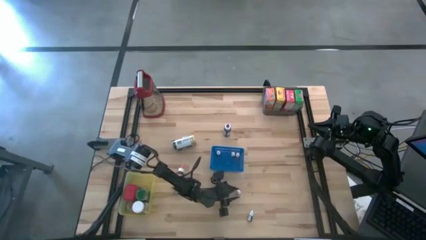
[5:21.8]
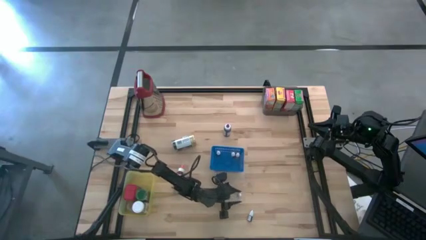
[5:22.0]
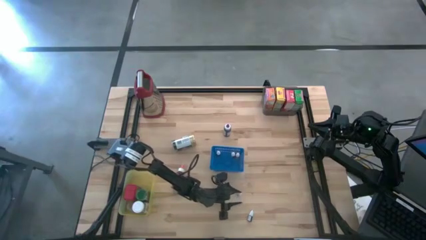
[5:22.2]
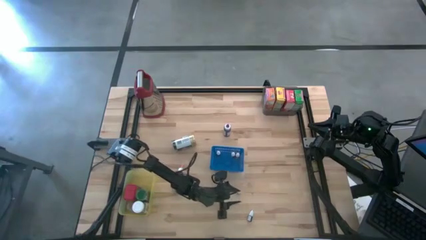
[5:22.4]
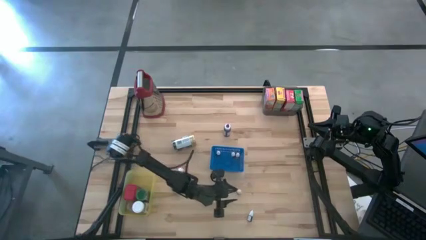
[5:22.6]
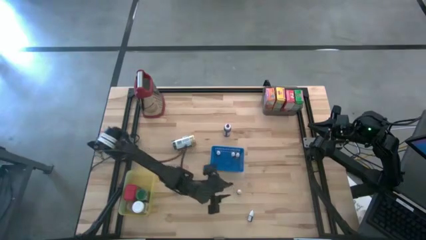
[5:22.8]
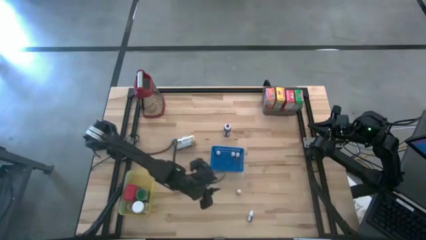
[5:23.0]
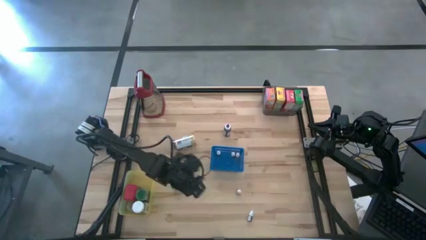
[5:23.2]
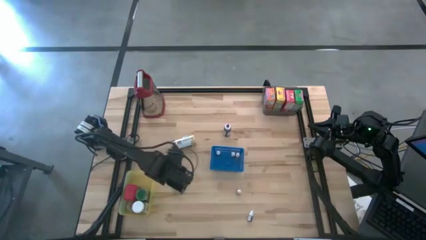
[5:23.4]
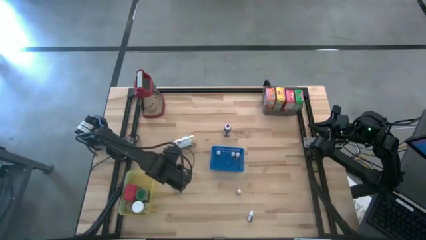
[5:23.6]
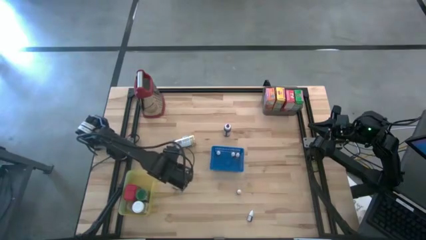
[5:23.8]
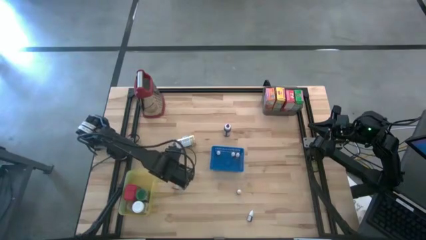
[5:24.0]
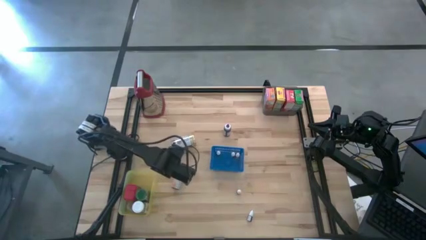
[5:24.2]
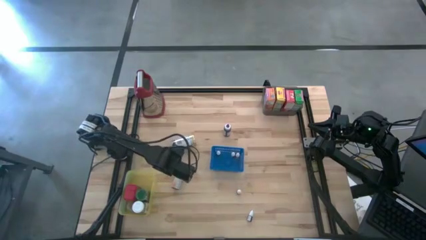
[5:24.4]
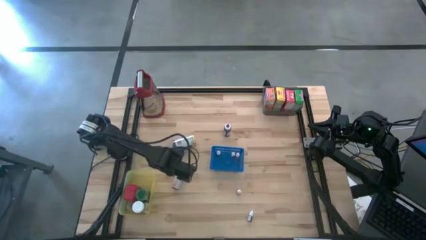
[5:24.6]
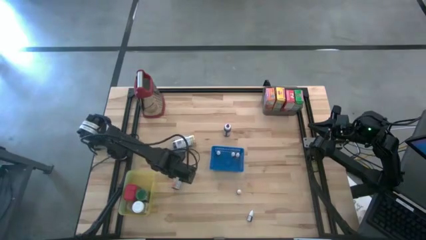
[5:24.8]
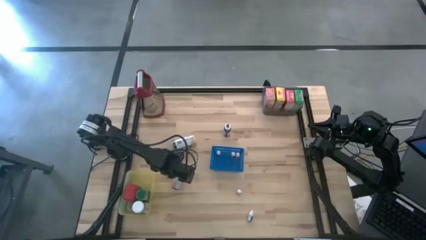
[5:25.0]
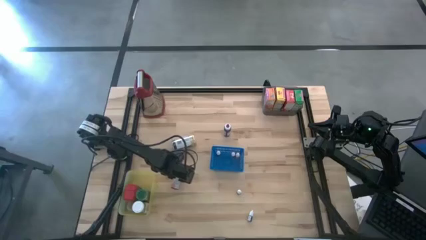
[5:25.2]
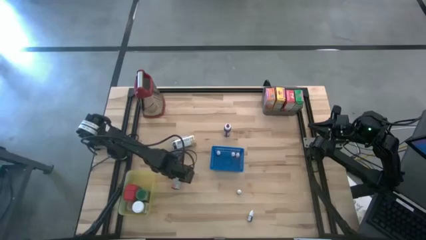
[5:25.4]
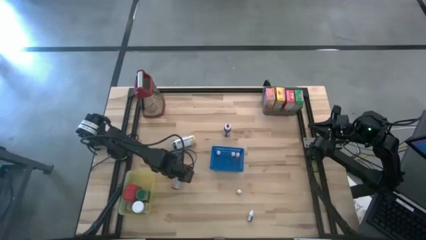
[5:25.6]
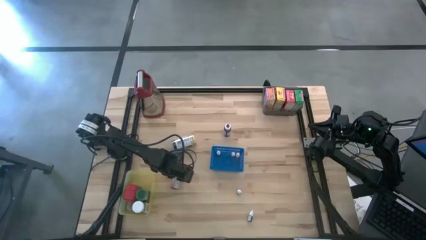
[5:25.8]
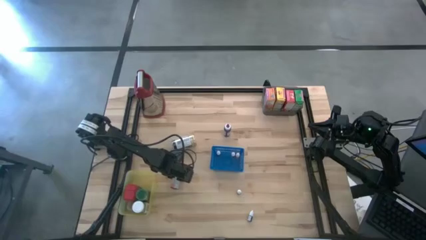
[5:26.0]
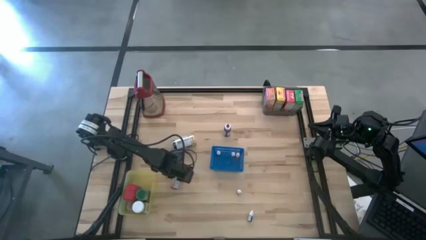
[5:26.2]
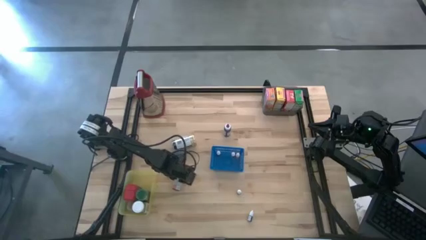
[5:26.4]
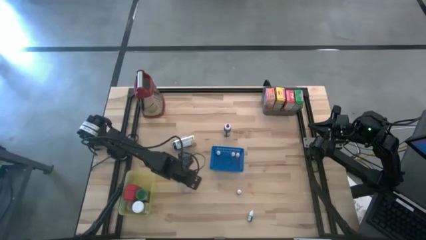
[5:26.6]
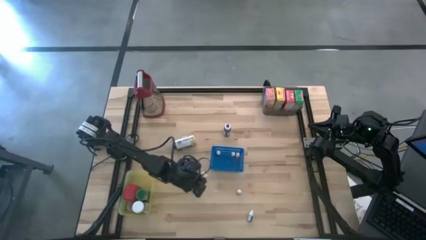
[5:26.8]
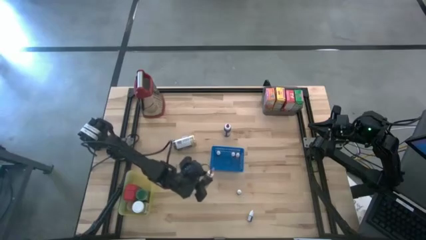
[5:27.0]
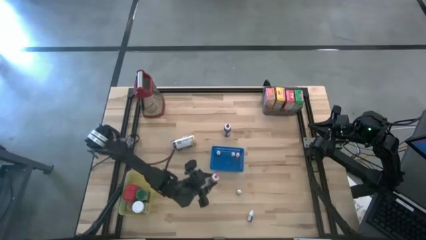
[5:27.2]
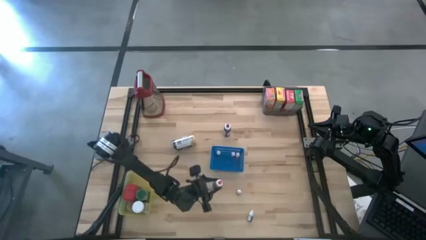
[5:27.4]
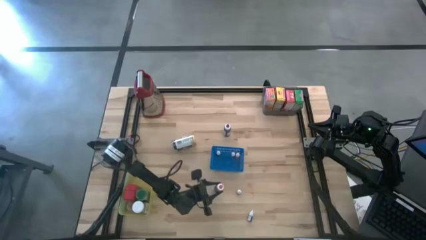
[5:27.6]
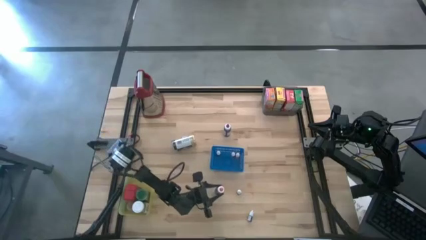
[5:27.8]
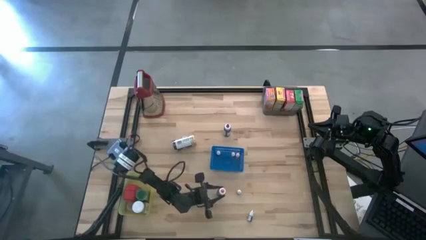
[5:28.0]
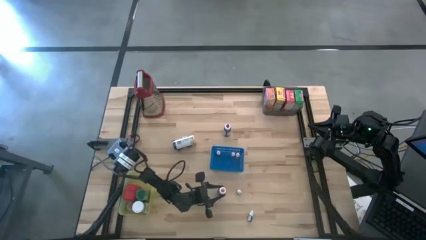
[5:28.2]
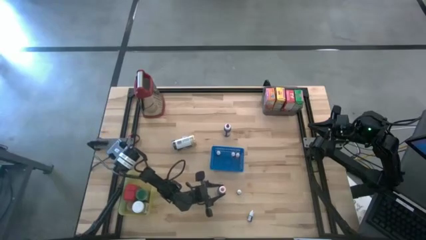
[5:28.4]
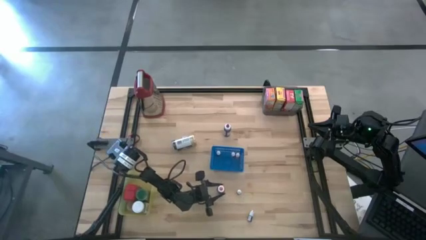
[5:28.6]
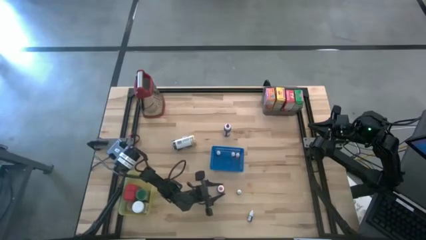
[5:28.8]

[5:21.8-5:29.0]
Task: Pick & Place Kitchen Items
Move the large pink food coloring bottle to the bottom middle of the table

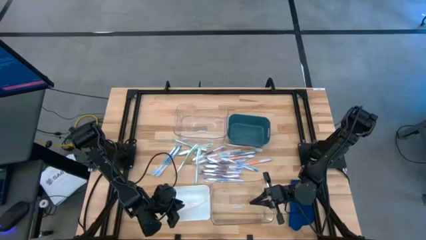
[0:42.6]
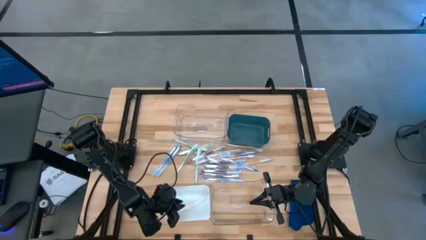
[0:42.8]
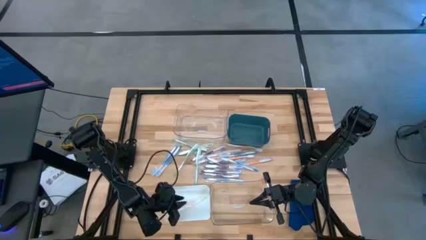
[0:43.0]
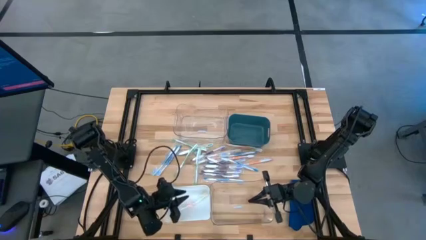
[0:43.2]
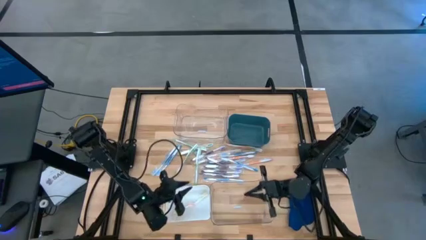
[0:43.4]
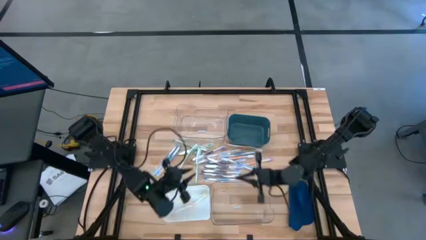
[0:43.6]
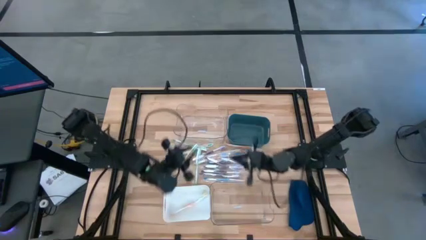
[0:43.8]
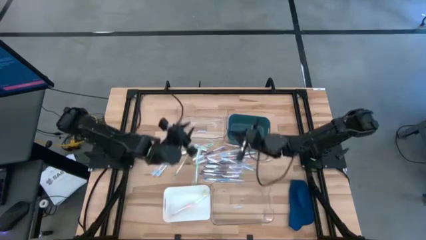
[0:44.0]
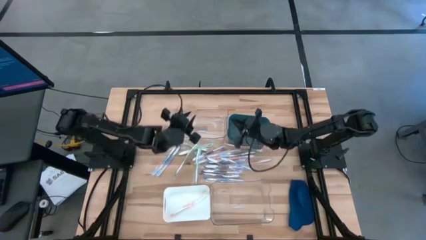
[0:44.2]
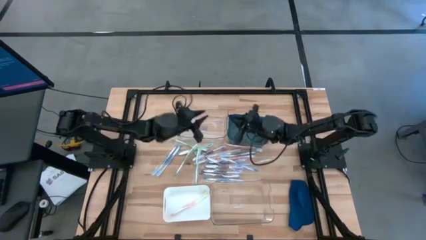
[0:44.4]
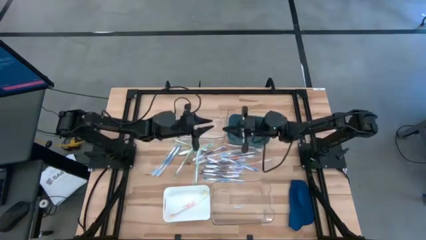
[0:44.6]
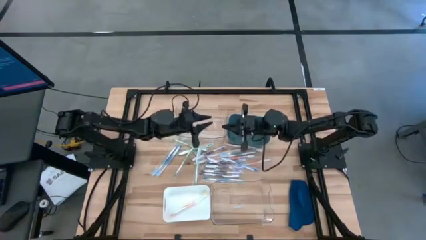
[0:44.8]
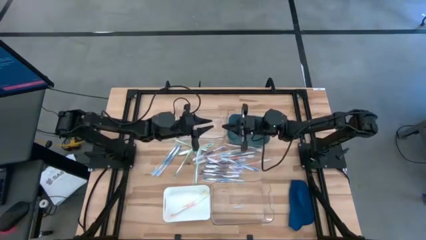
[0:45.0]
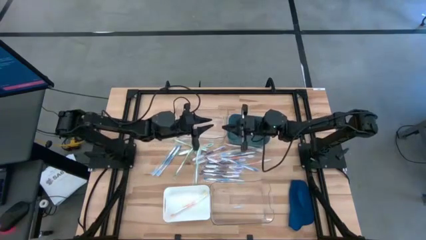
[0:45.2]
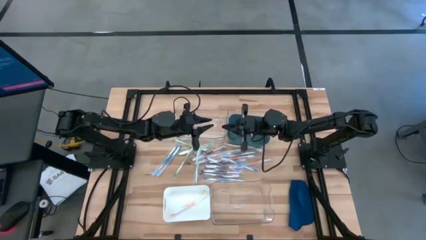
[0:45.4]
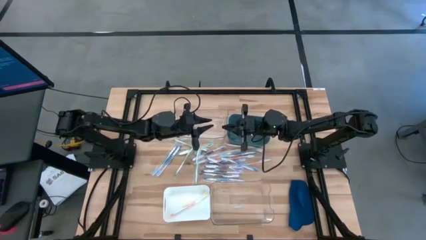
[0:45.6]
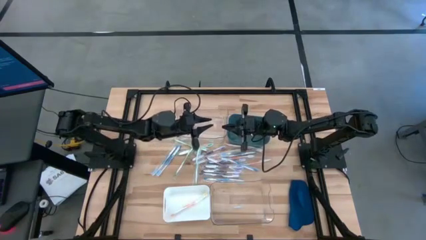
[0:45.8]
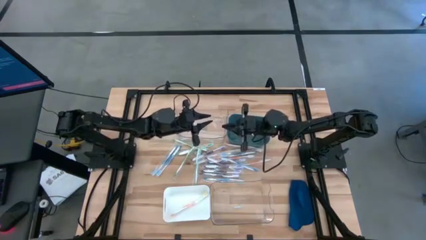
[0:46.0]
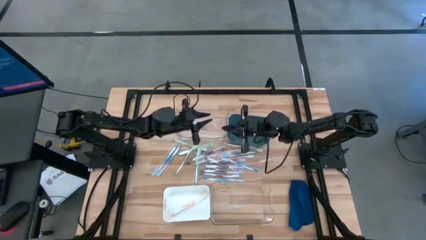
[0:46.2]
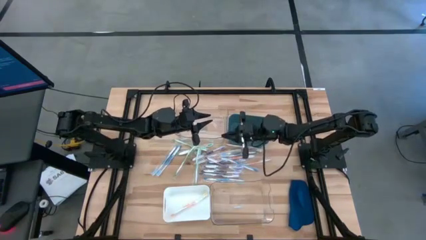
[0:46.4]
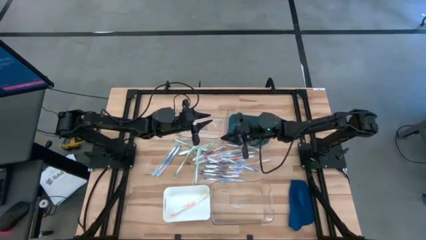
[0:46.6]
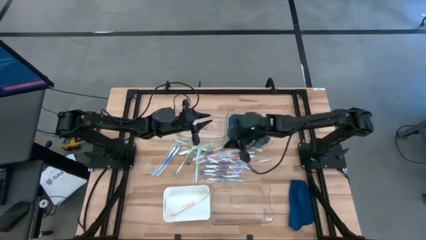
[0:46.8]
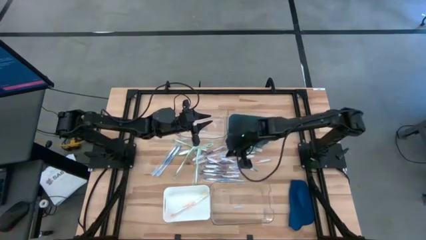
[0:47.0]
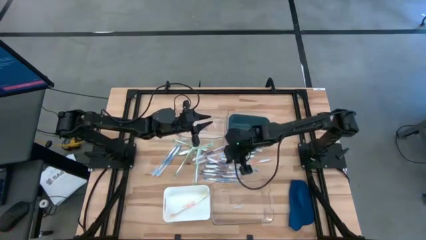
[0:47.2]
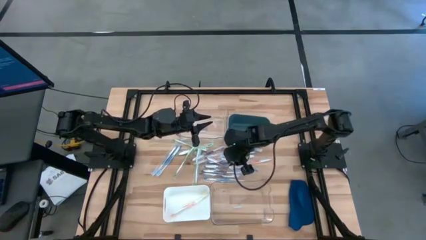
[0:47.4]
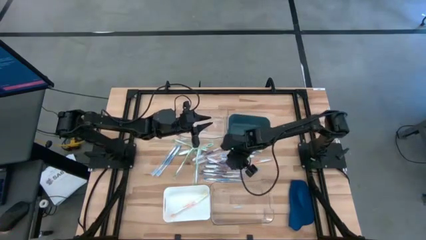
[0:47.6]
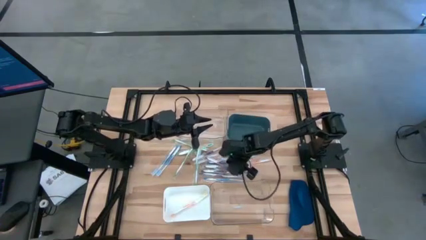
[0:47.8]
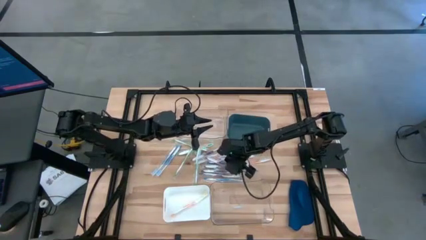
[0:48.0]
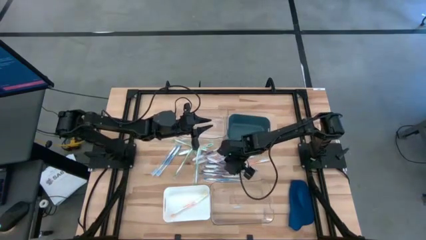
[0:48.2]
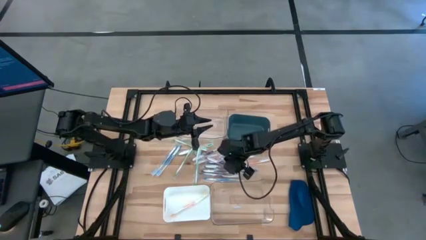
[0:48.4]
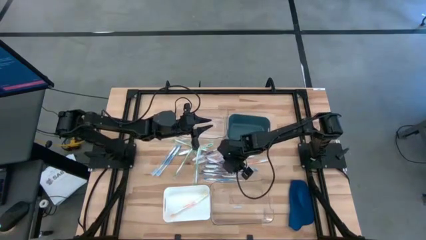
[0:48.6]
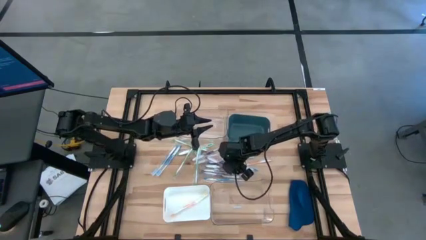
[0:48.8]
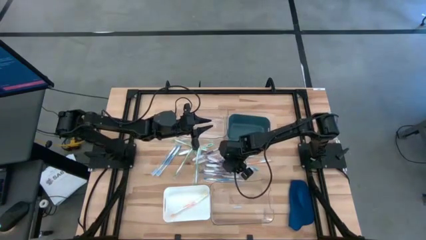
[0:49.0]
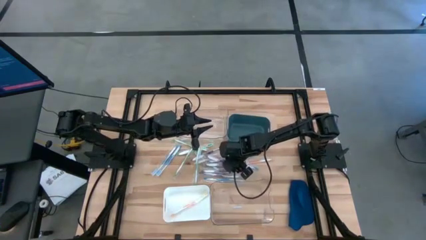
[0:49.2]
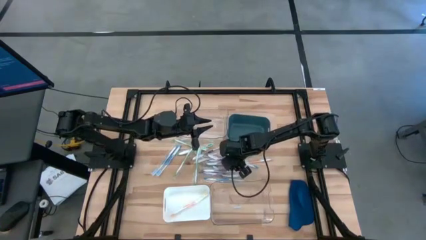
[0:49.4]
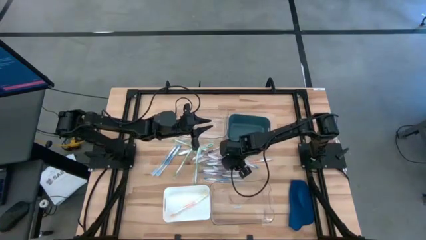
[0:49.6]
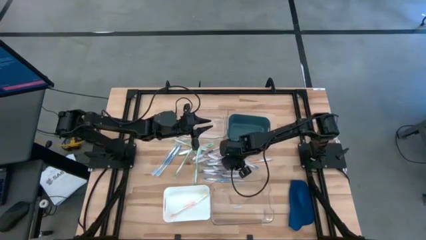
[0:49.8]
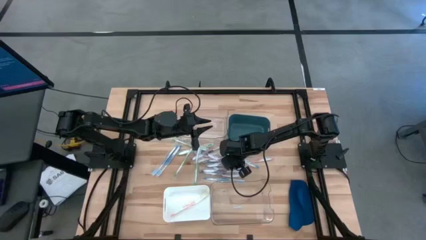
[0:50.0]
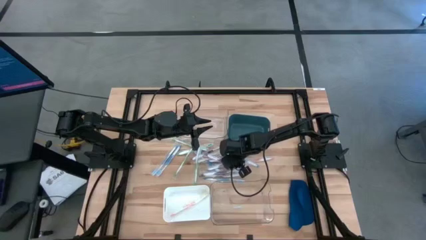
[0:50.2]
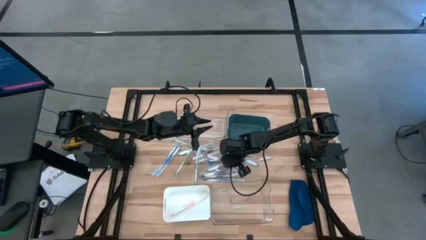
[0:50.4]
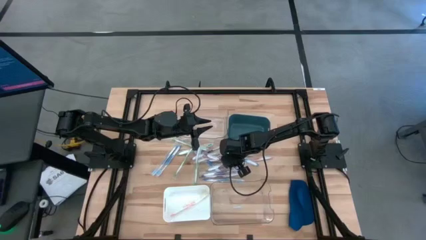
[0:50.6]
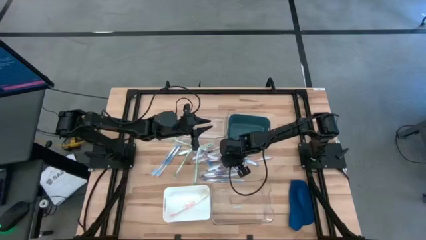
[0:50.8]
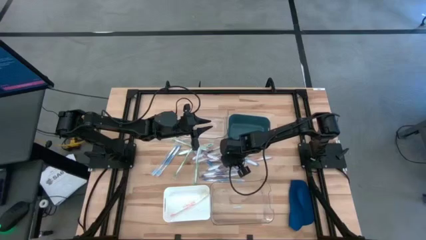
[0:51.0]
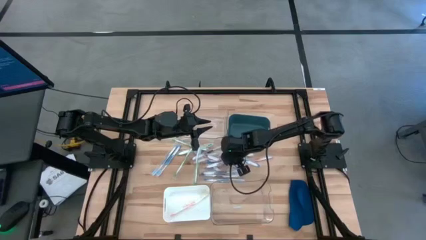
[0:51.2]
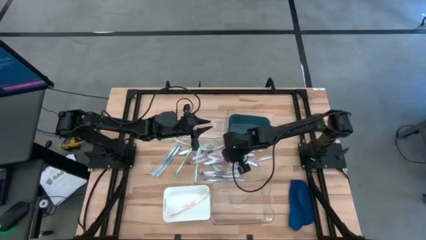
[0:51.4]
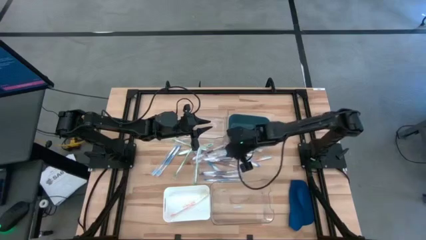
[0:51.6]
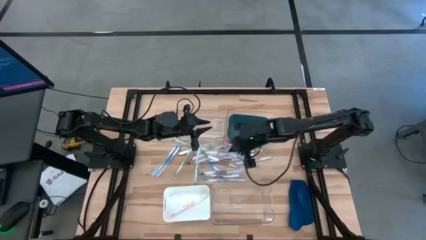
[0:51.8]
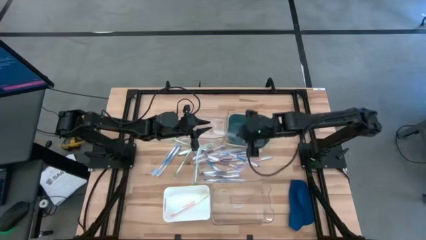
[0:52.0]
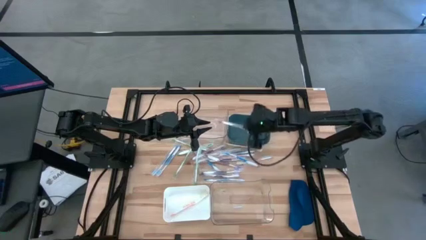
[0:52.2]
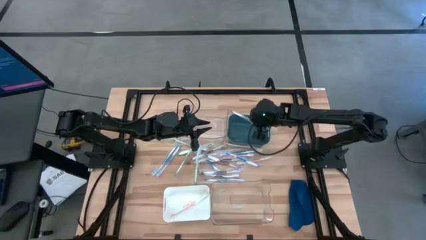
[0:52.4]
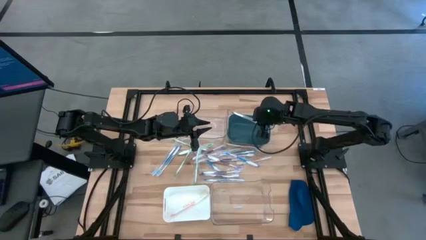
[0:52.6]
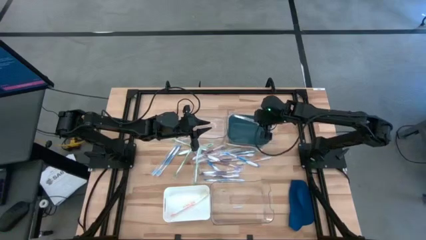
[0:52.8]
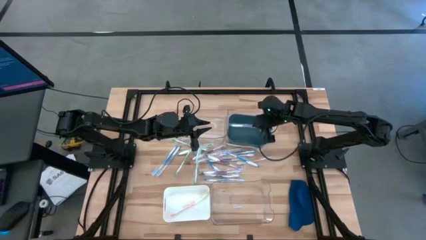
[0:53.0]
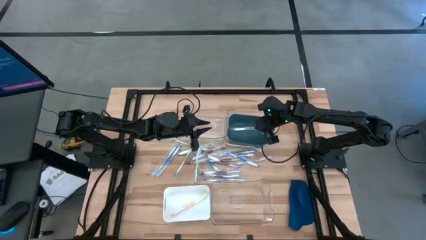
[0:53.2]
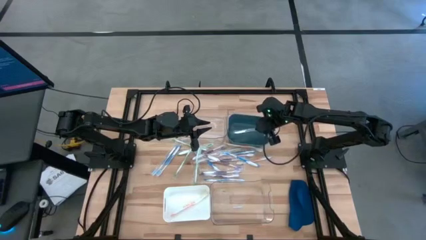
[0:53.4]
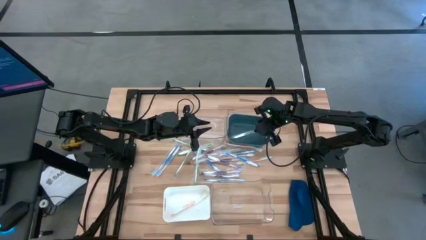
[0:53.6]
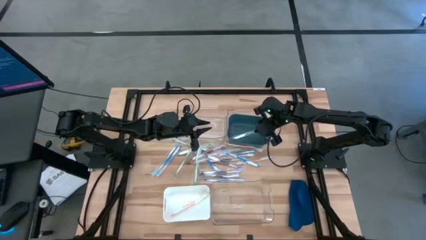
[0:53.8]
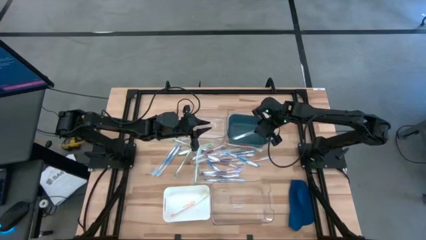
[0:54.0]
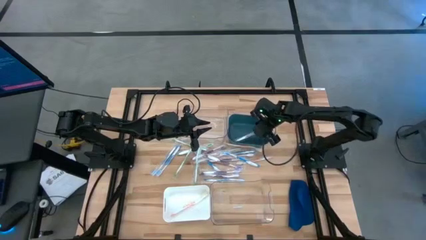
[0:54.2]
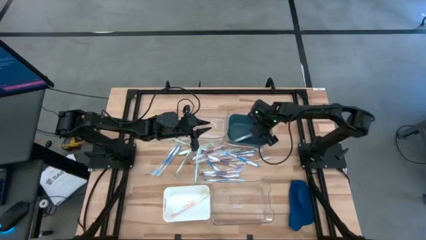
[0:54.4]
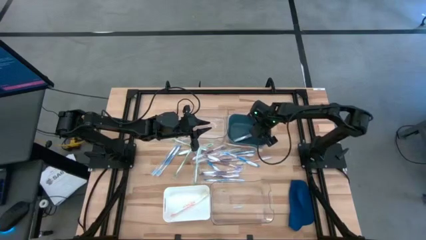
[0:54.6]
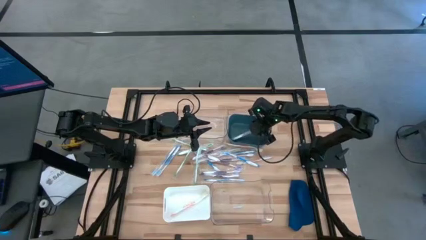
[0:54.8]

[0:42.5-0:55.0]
Task: Pick & Place Toothbrushes
Put the purple toothbrush into the green bin
